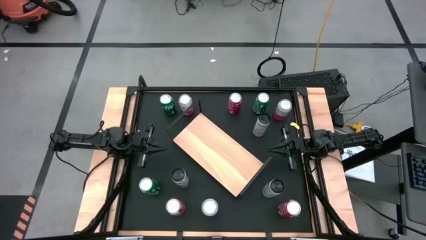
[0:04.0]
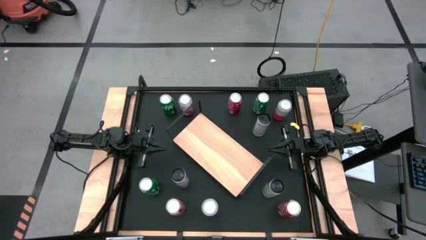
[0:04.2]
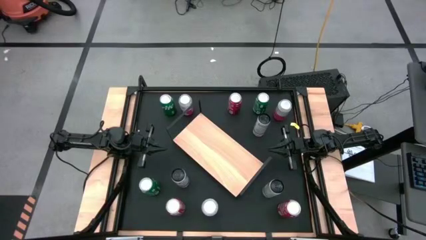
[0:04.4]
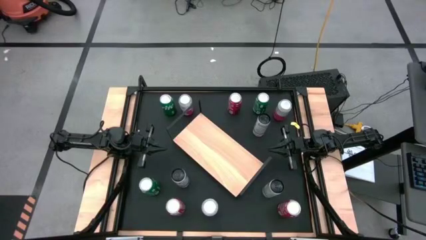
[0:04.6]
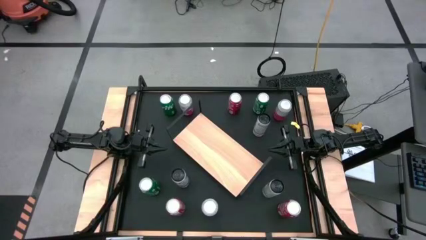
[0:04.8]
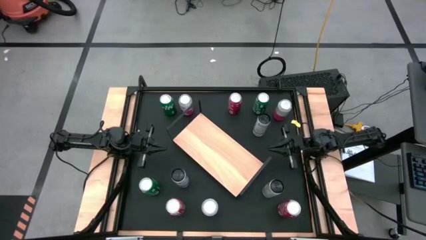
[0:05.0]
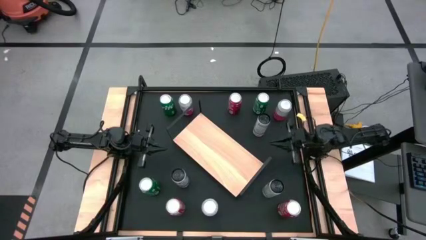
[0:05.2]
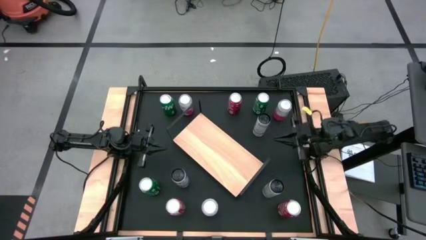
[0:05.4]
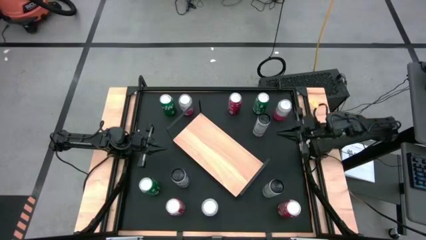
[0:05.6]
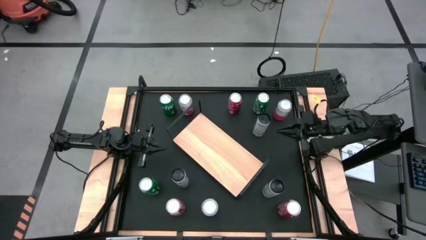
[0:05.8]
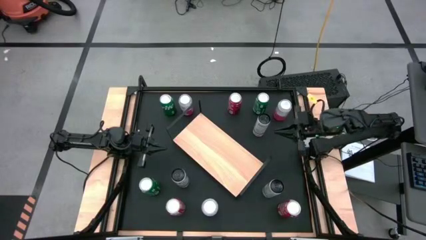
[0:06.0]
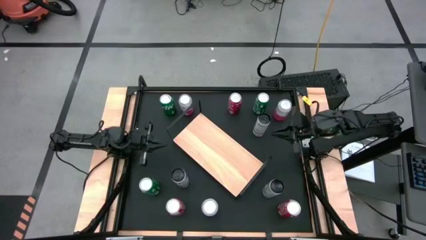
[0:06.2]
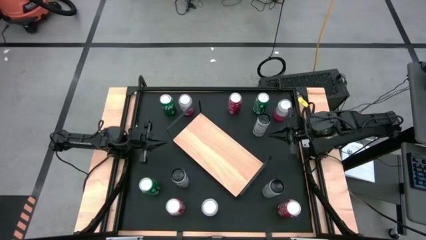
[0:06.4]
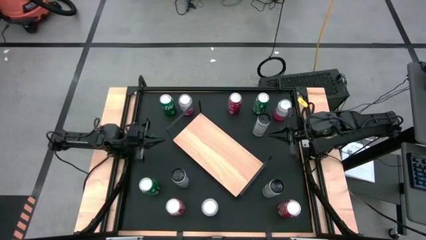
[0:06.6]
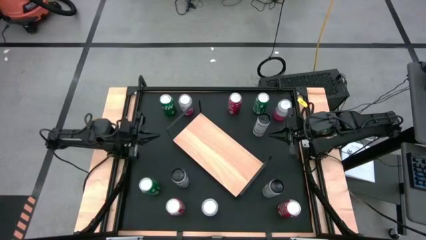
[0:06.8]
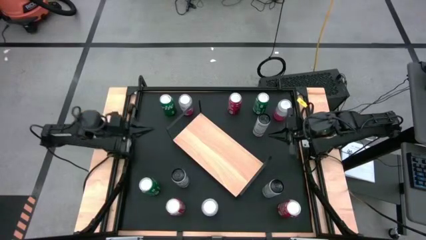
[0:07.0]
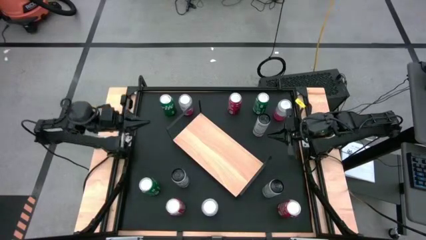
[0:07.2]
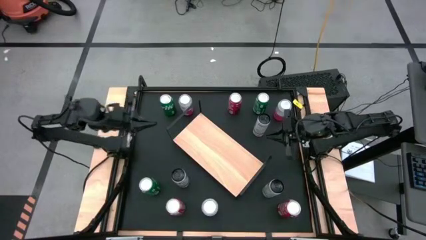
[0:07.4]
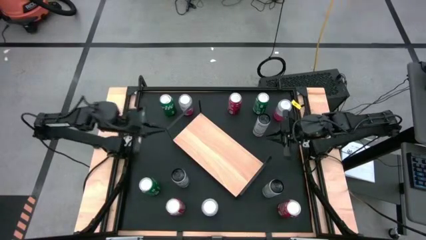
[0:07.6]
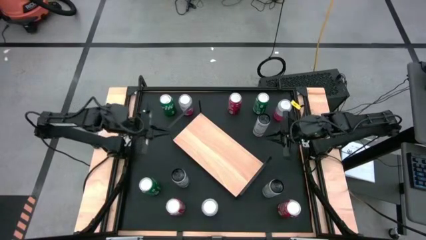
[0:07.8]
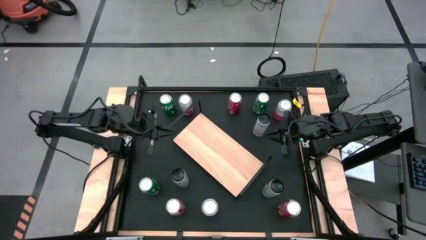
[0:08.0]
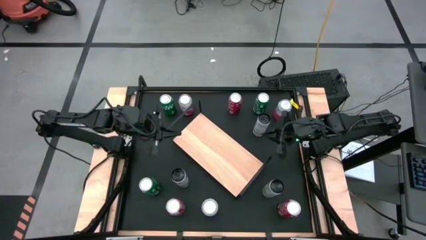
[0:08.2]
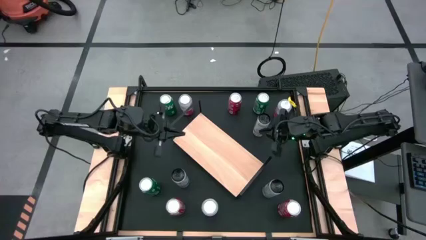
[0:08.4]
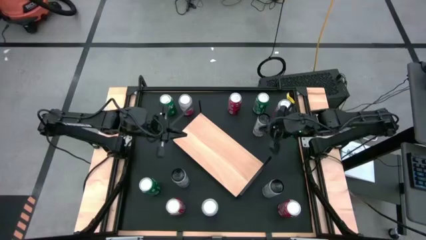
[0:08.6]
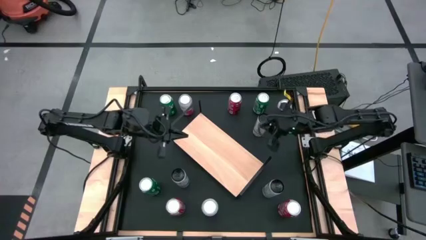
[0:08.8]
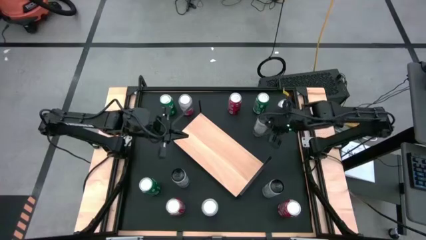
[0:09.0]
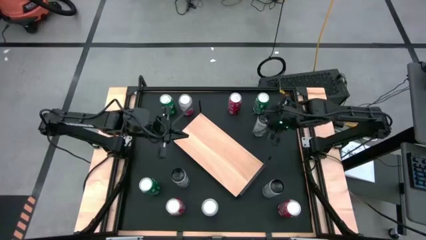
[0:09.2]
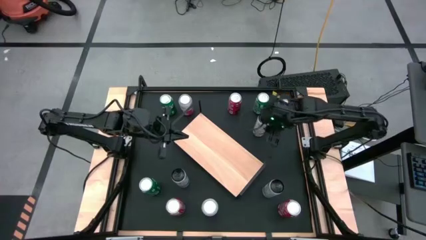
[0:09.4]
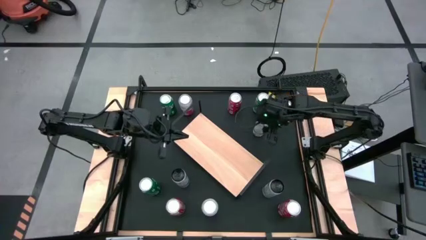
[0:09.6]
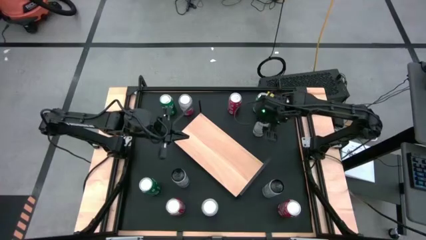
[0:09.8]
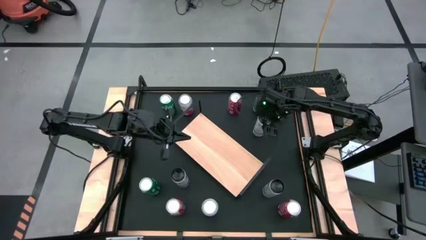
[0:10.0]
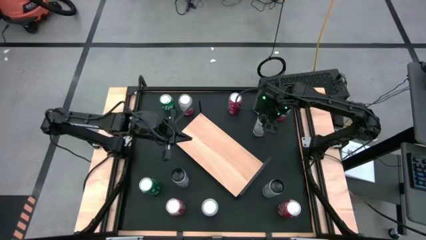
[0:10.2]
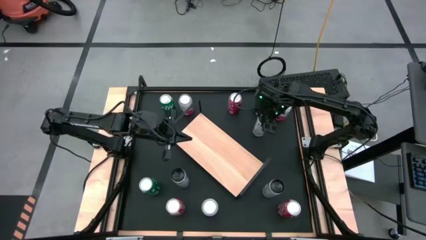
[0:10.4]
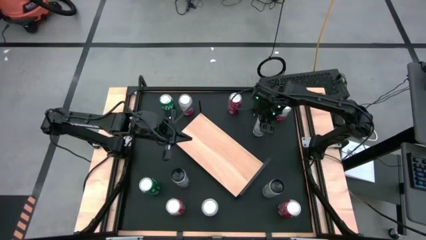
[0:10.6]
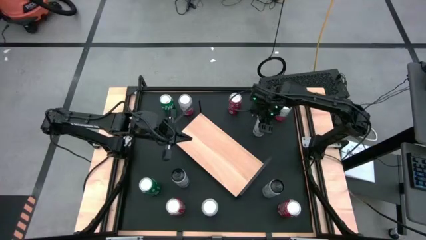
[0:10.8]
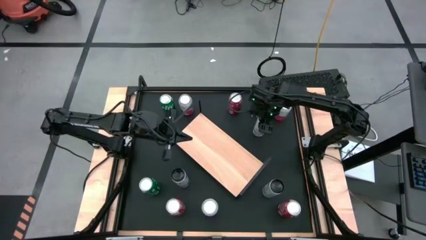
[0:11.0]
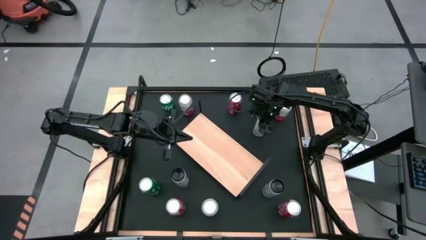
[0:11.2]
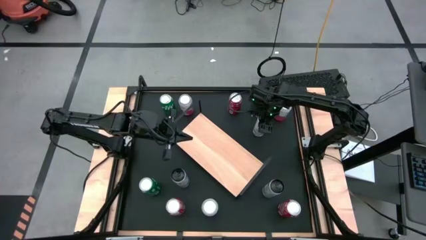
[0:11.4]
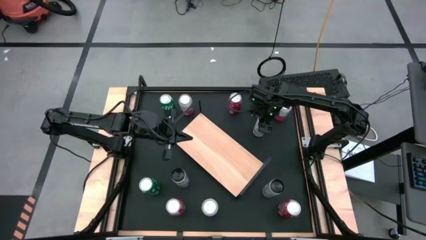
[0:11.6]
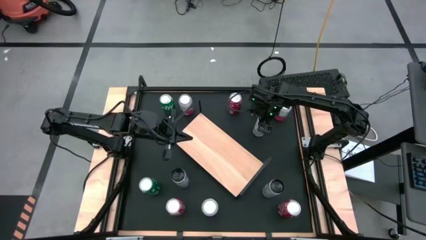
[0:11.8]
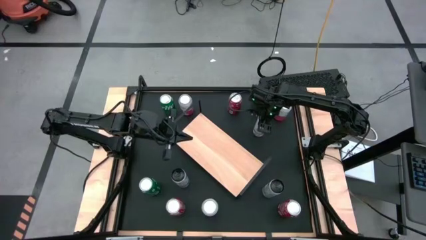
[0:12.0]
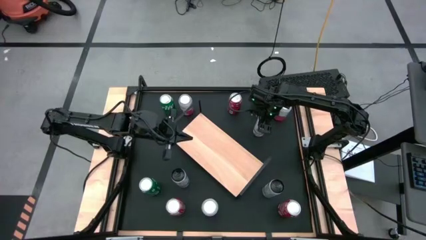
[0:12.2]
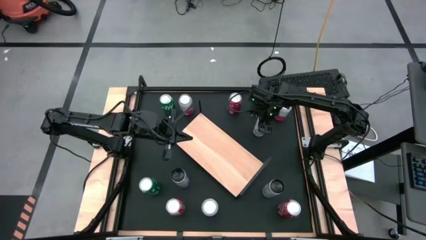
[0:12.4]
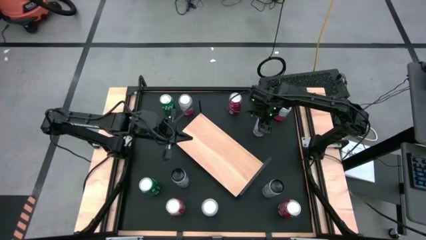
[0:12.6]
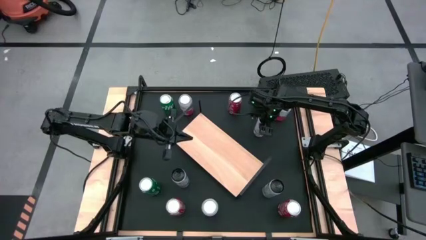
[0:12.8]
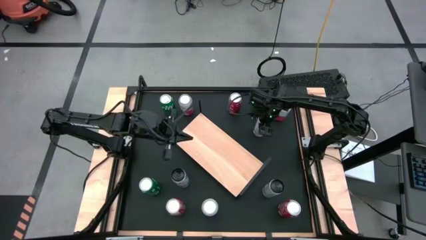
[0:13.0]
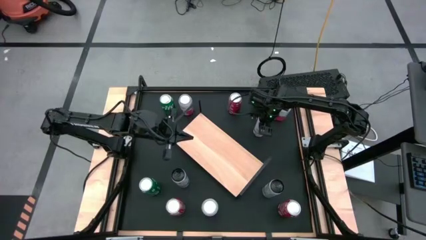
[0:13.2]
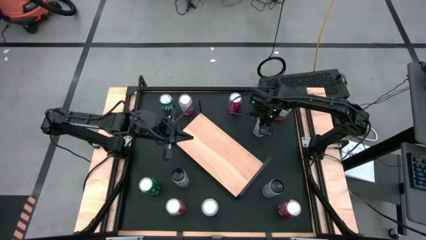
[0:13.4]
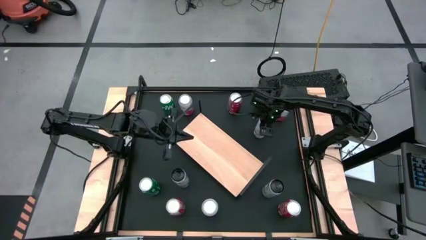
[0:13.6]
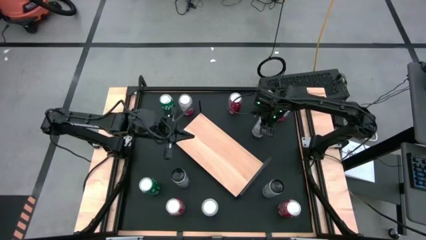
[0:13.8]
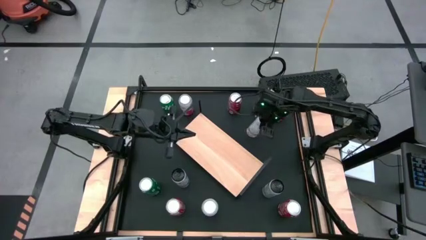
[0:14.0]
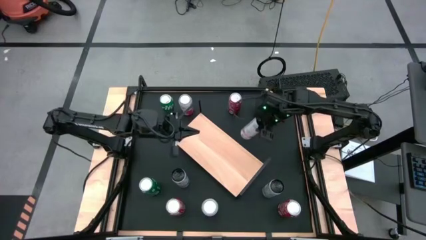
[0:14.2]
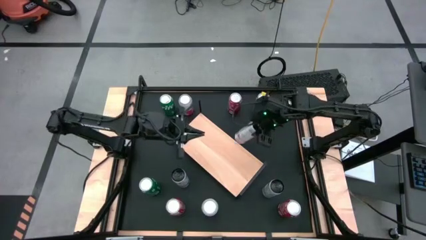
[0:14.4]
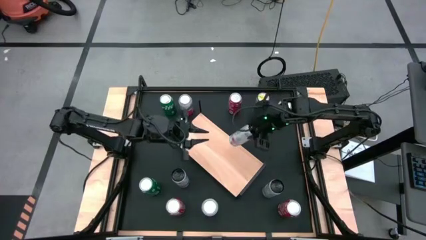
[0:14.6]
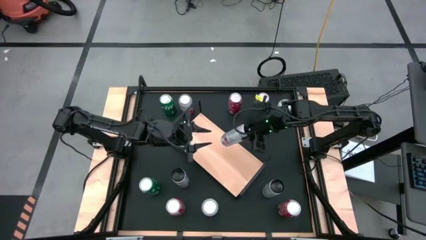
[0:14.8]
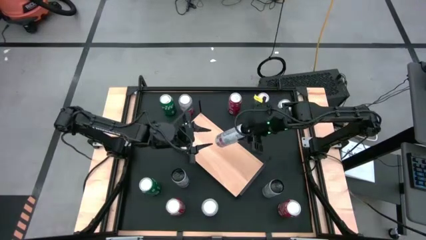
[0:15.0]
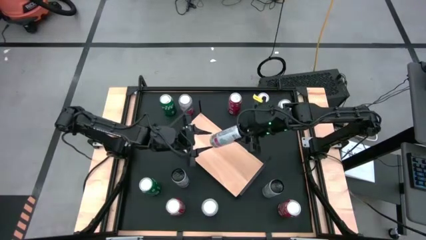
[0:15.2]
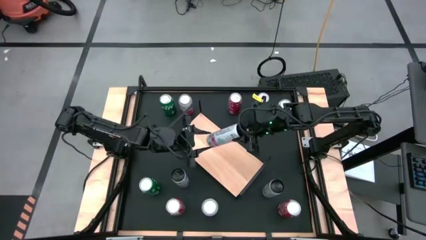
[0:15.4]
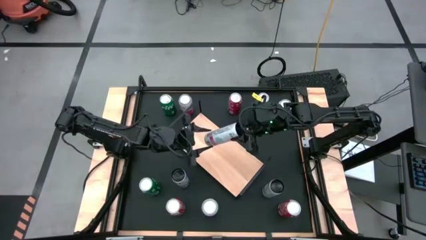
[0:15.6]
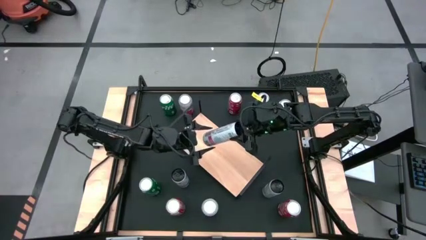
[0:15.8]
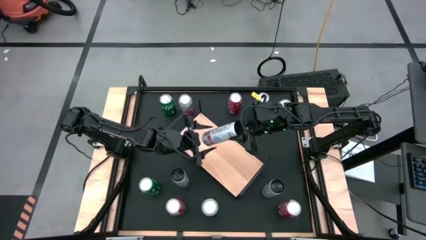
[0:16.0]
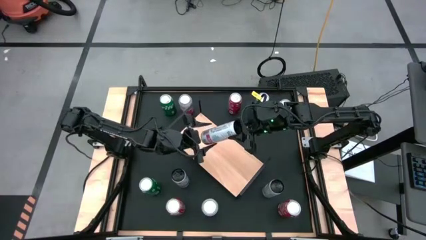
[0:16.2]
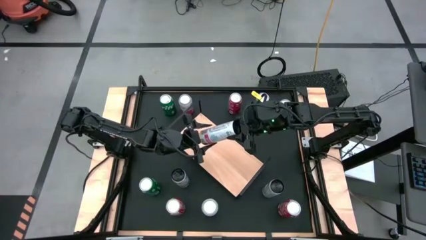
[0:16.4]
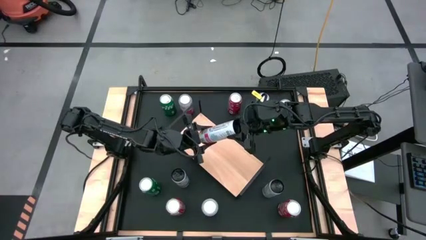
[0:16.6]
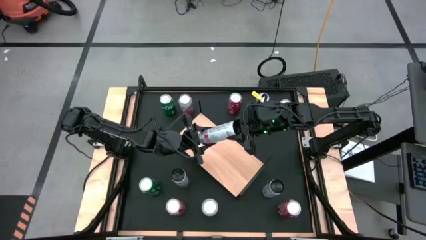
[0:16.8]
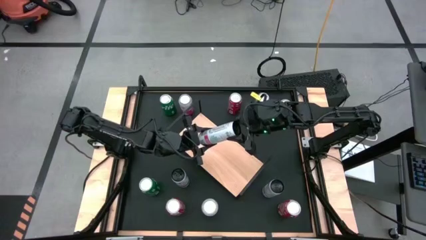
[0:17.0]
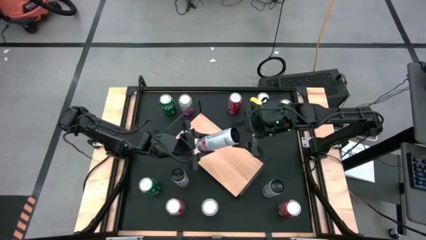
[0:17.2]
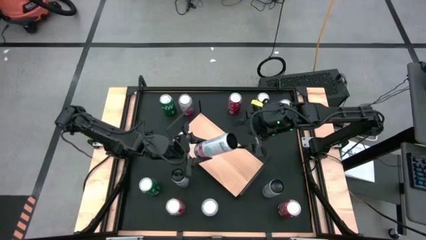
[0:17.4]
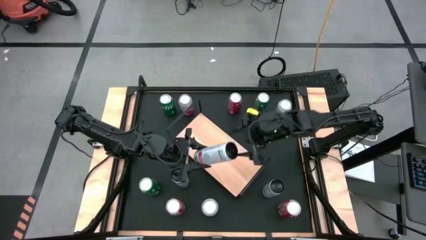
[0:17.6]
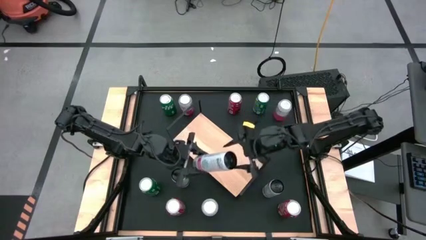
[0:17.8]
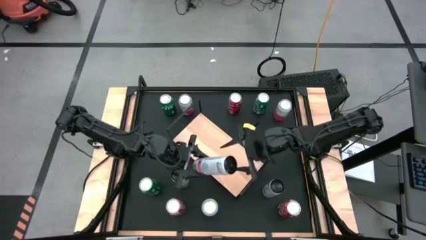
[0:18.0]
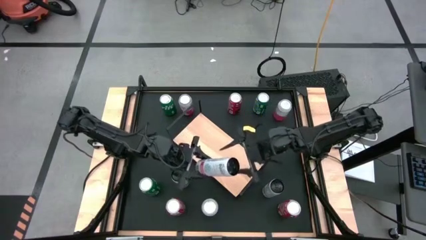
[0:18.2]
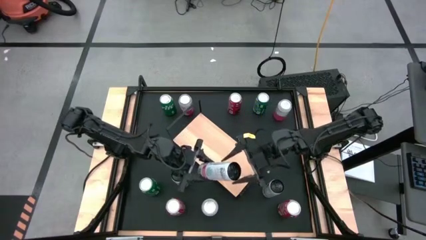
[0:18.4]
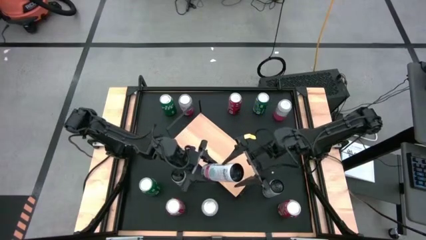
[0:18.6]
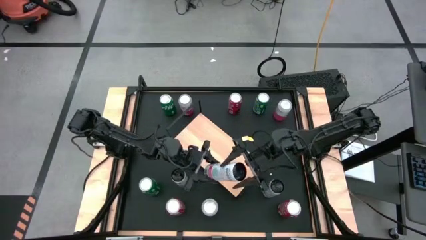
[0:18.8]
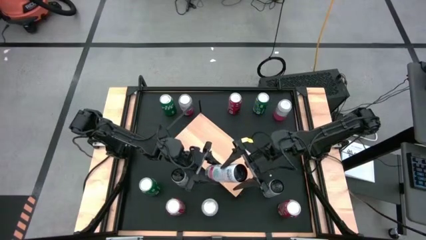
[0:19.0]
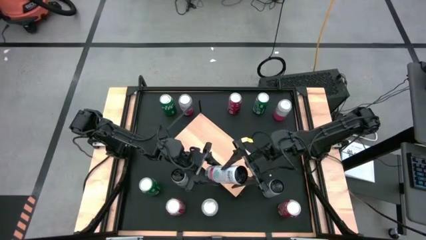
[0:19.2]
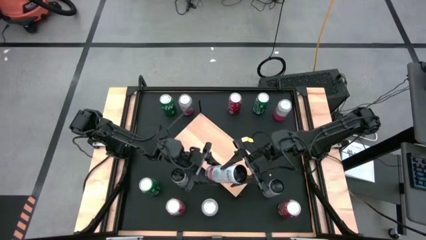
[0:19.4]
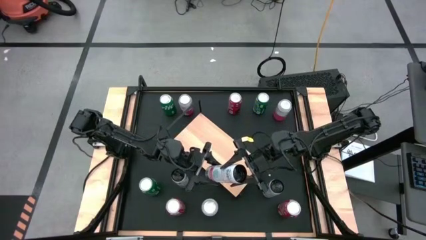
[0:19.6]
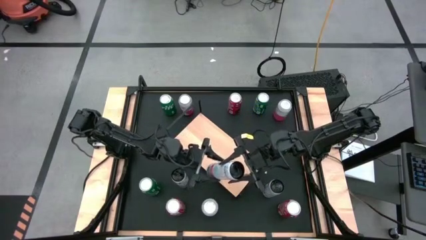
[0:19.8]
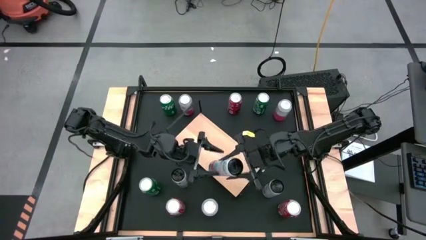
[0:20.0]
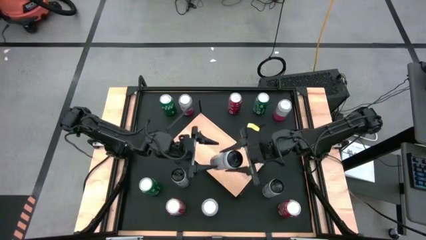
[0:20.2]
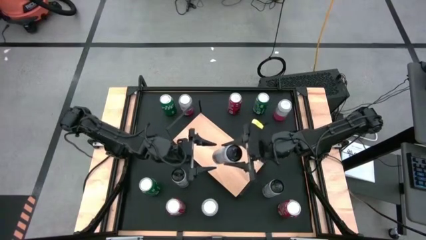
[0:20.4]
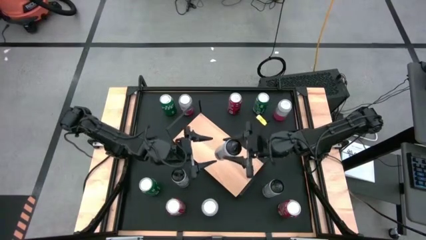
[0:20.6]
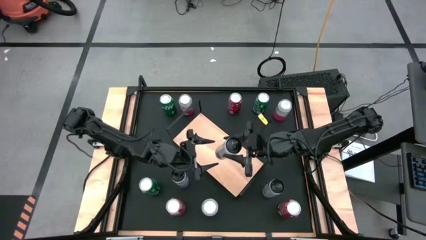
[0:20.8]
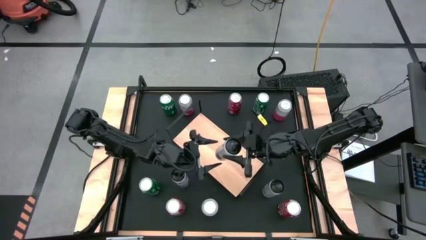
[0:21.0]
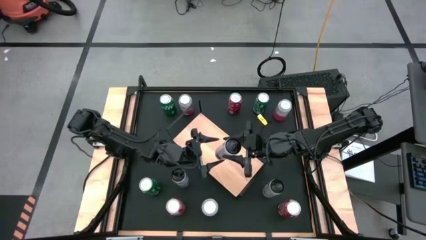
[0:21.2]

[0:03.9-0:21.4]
Task: Place canned beverage on shelf
Put the top white and pink soda can on the shelf
